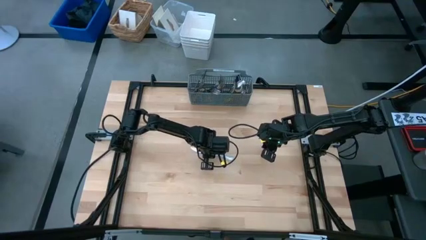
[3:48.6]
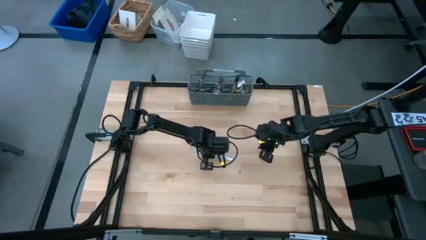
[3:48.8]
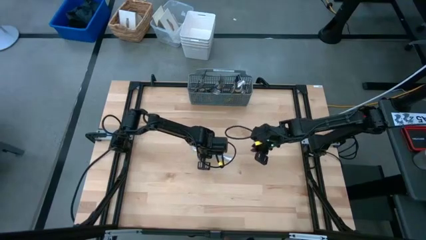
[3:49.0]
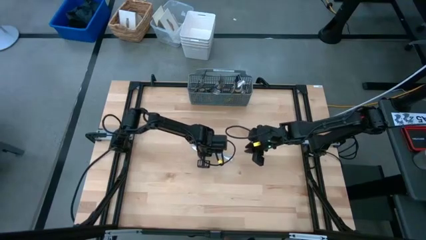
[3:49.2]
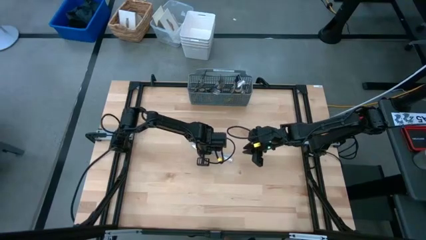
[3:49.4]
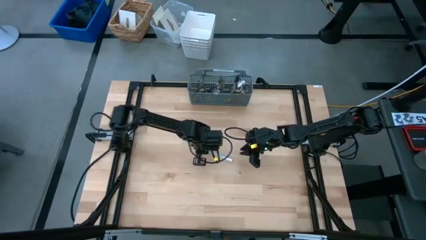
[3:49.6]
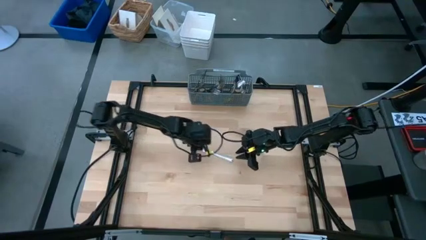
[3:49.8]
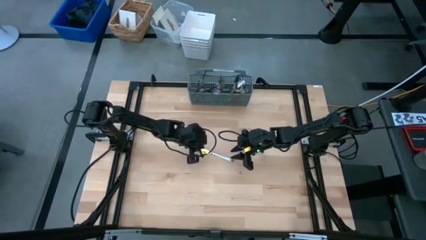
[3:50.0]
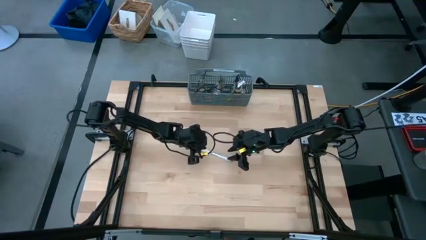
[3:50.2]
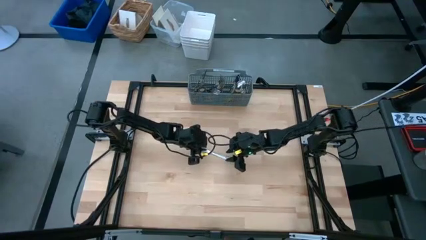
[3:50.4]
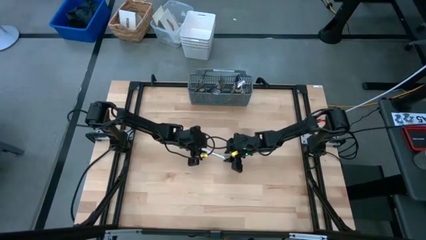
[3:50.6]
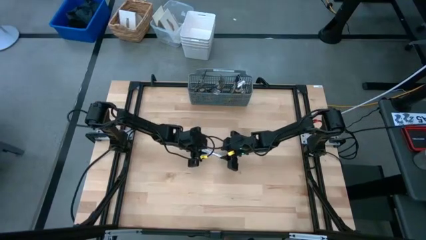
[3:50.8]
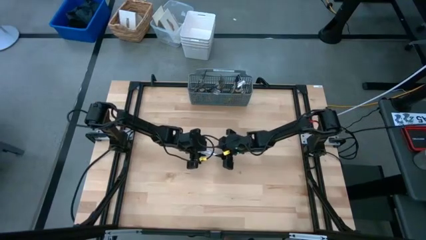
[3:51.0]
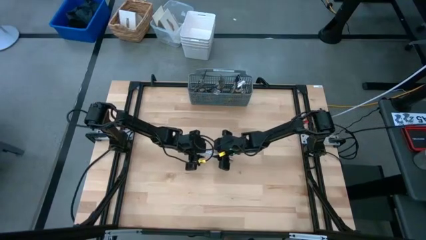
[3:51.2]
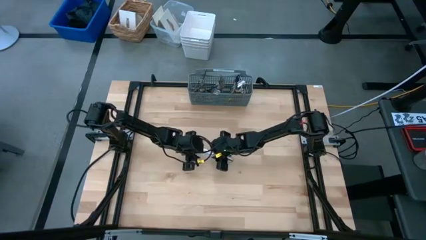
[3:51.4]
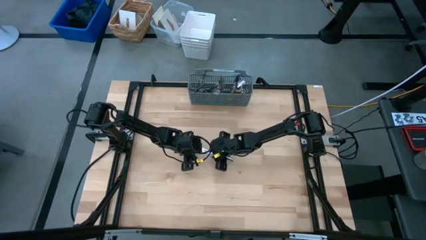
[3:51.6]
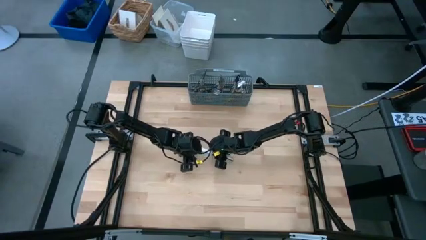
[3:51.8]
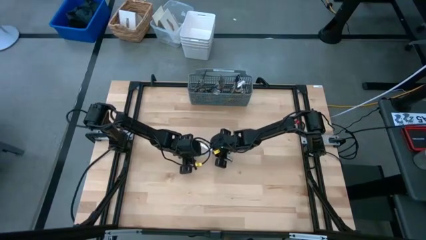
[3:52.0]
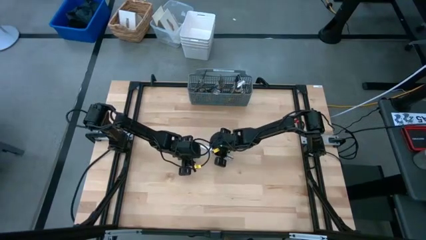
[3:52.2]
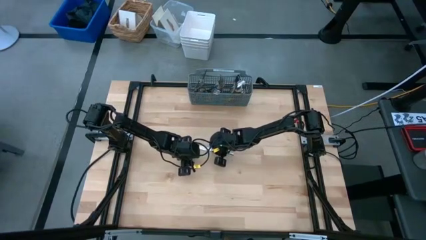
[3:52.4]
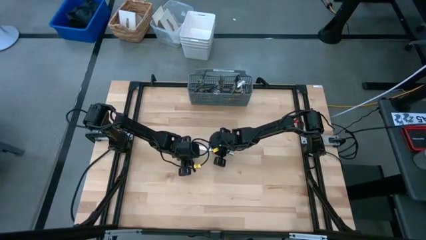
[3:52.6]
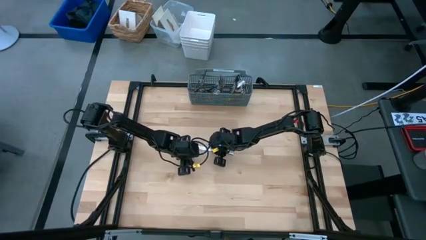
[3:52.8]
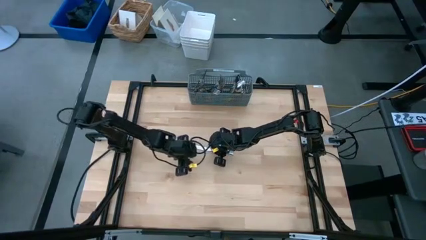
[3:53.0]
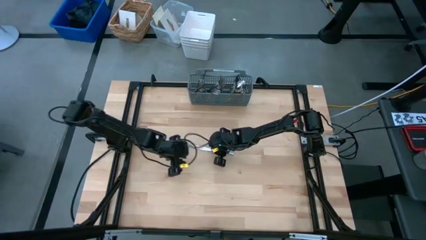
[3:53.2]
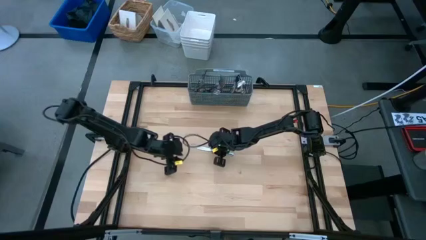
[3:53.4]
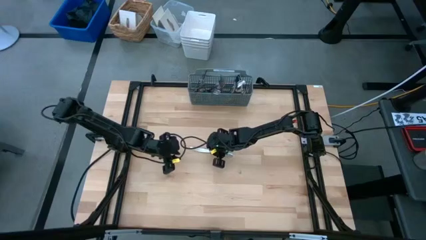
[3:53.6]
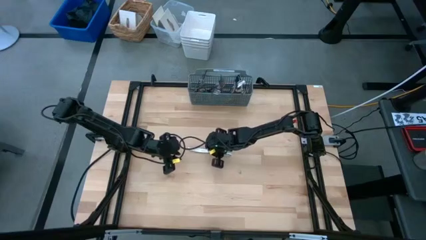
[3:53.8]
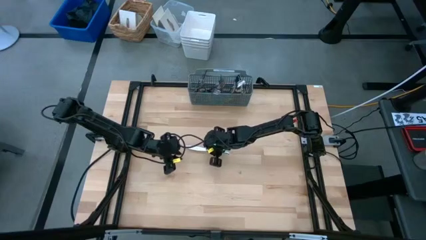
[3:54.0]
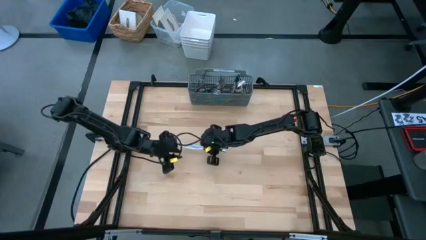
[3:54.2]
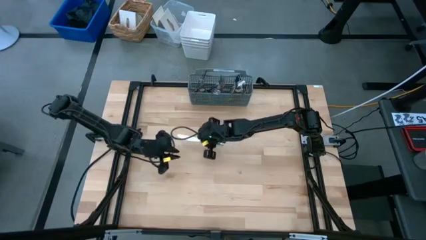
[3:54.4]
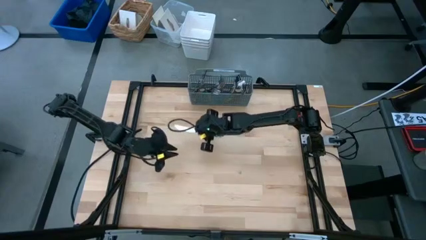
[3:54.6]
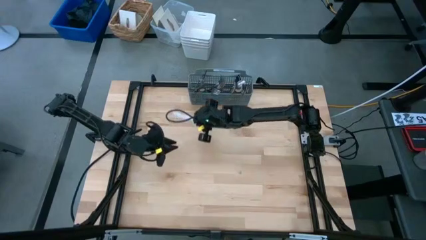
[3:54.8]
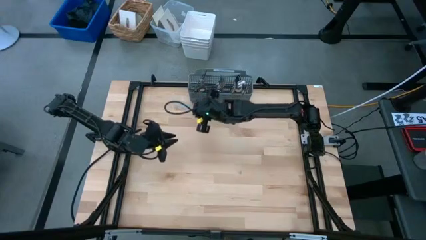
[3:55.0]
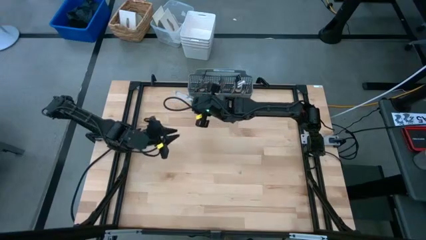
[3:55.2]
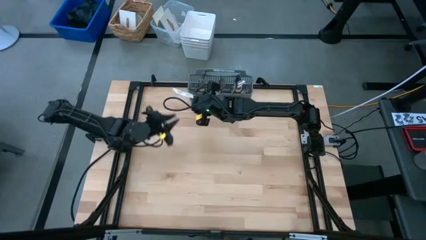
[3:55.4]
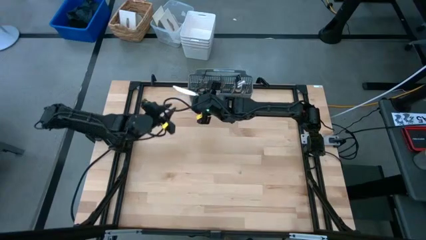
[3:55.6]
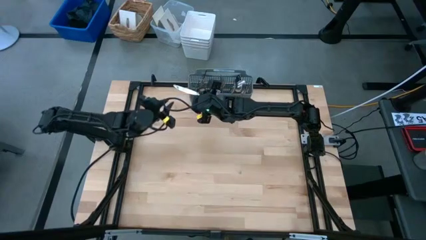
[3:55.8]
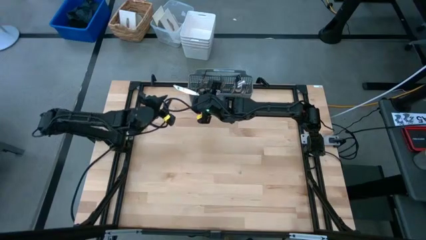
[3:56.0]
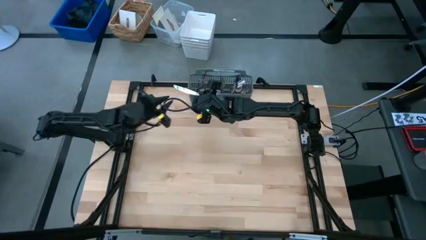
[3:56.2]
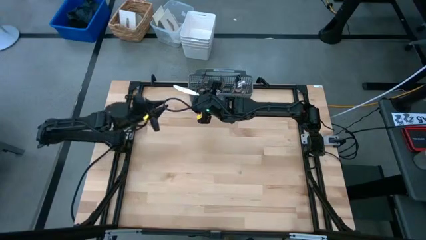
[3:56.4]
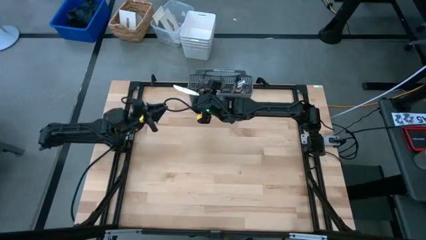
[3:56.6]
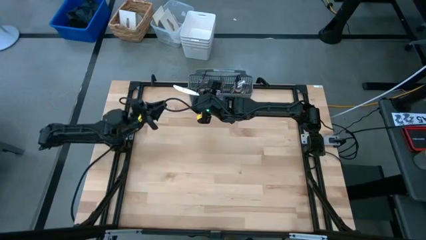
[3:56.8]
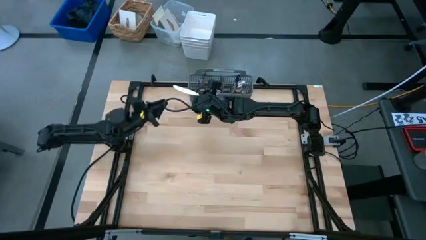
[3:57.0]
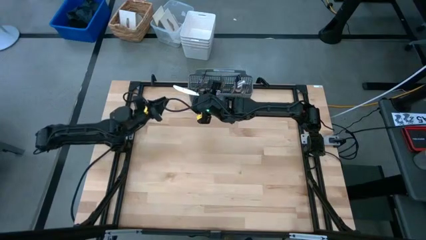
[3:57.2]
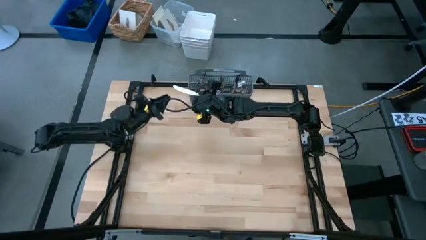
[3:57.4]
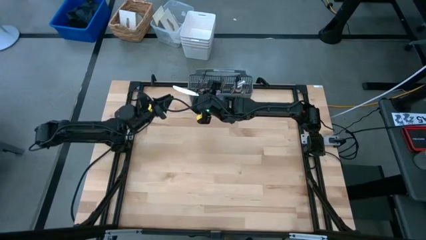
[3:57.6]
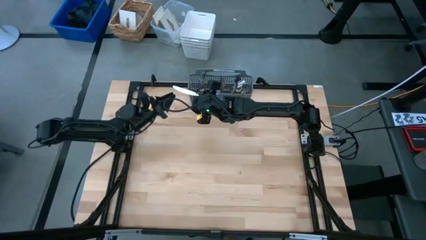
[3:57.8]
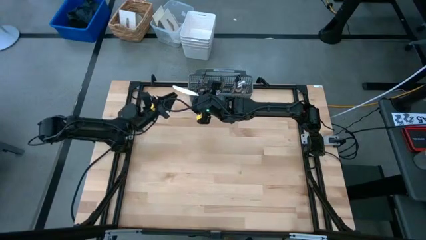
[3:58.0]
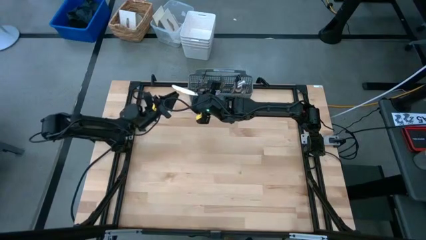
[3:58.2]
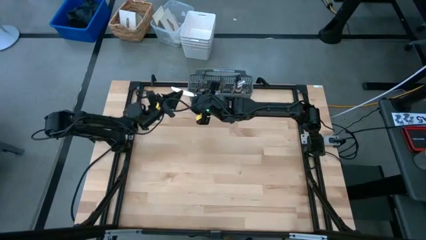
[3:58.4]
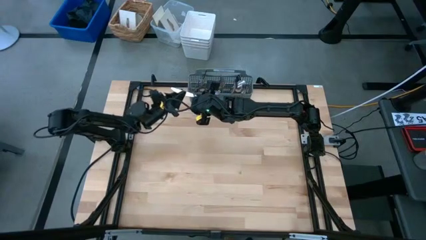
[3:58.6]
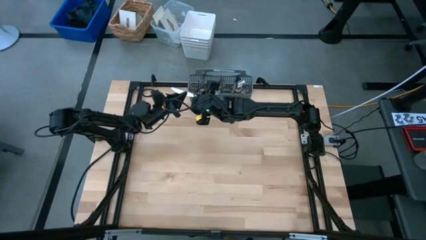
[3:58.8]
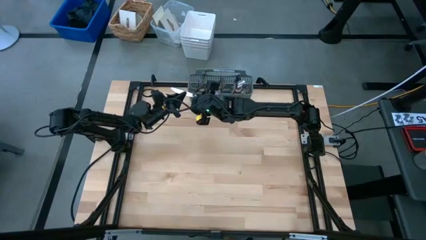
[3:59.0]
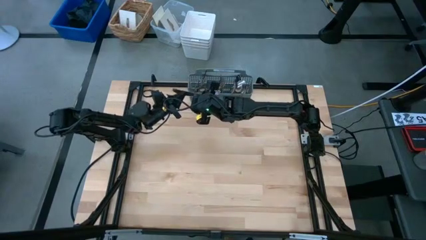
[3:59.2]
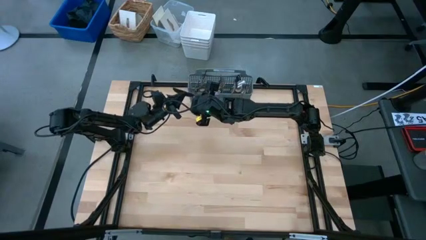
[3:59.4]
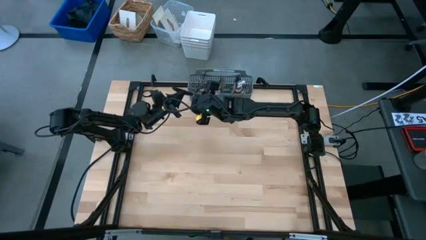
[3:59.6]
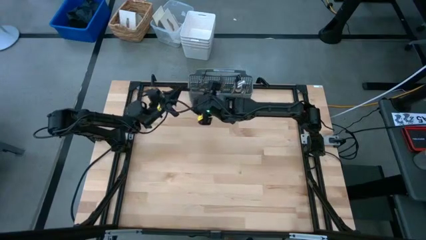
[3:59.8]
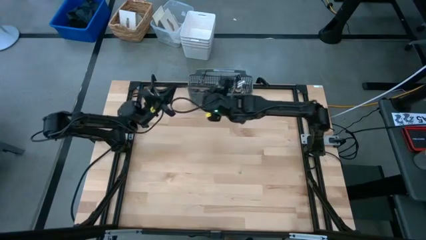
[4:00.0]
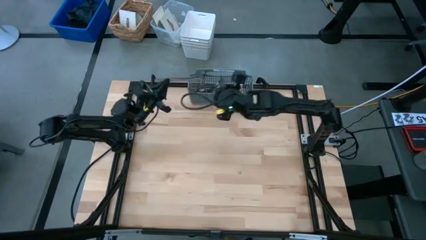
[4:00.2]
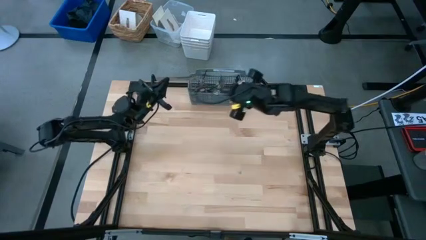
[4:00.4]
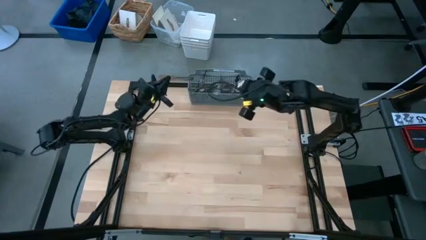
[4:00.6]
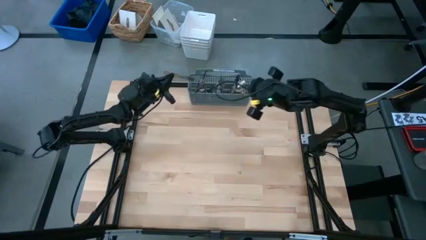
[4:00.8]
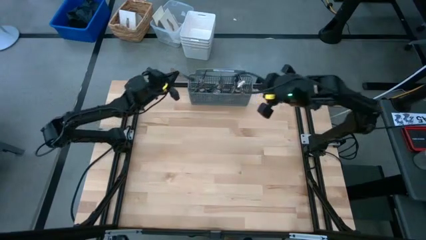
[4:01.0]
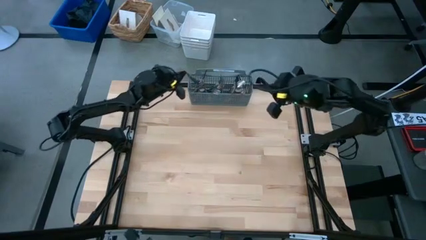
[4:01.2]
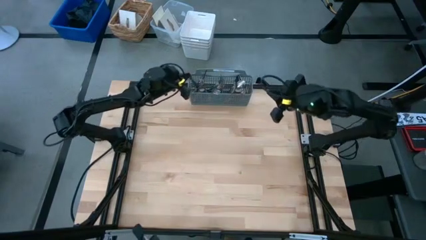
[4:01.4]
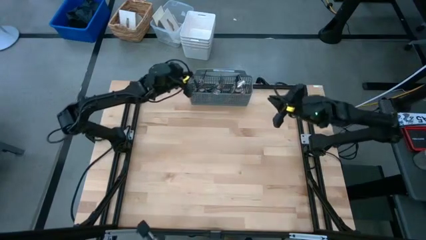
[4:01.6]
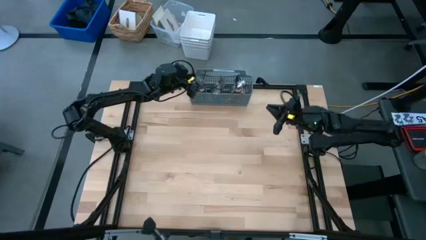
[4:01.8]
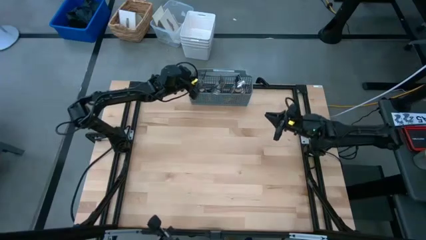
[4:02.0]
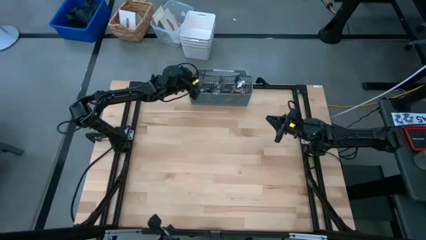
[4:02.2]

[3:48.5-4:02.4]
Task: Sort silverware
Put the table knife into the gray silverware organizer

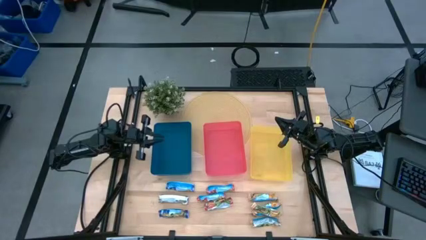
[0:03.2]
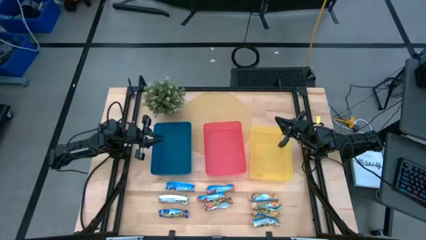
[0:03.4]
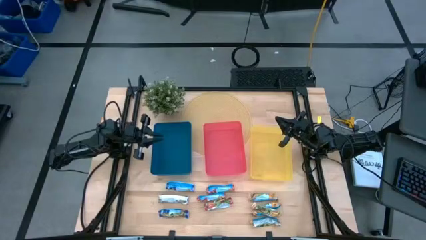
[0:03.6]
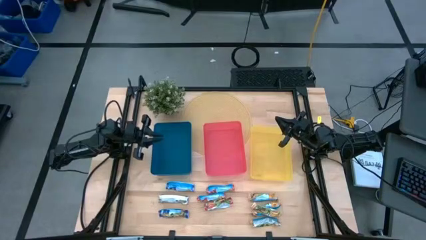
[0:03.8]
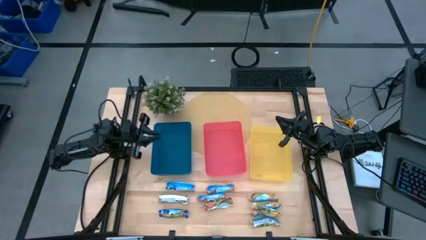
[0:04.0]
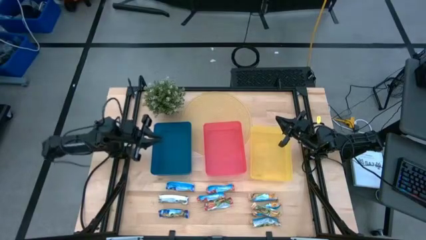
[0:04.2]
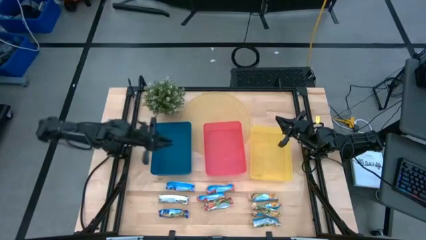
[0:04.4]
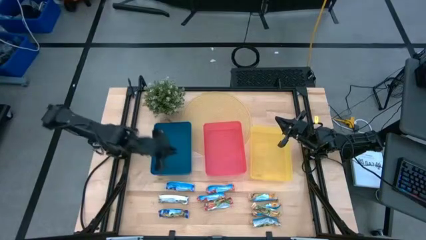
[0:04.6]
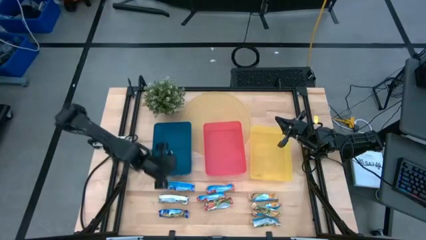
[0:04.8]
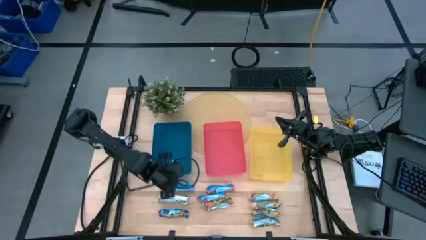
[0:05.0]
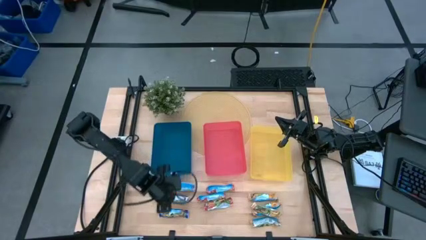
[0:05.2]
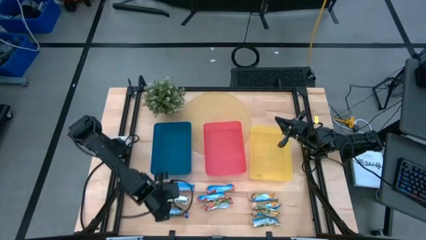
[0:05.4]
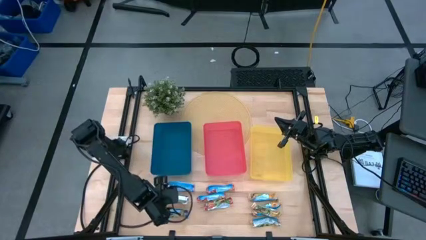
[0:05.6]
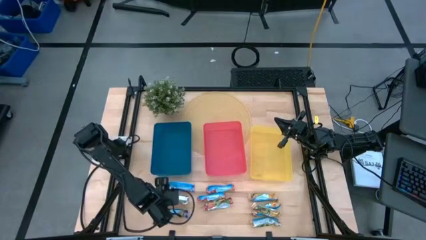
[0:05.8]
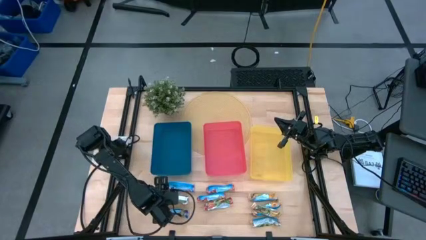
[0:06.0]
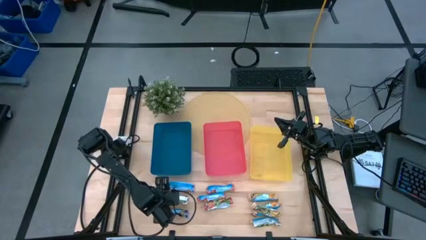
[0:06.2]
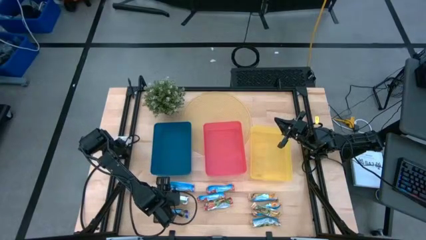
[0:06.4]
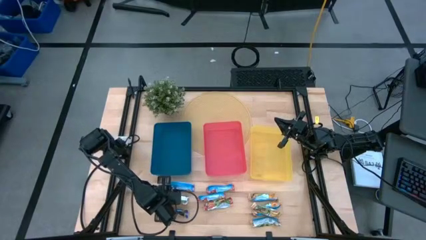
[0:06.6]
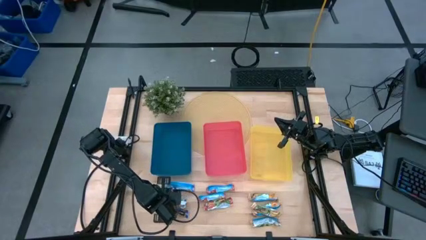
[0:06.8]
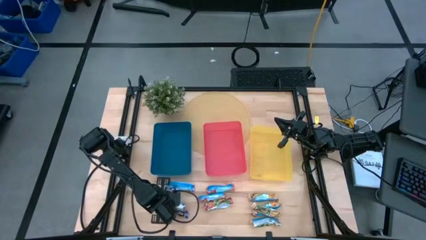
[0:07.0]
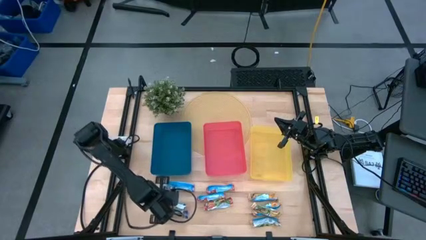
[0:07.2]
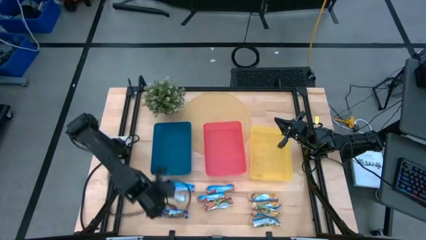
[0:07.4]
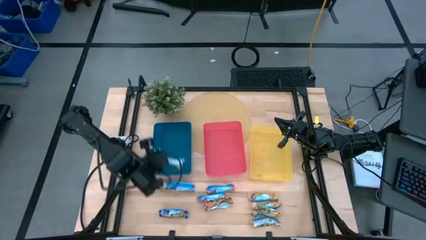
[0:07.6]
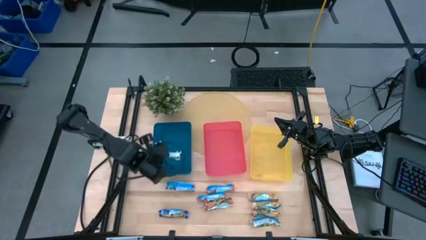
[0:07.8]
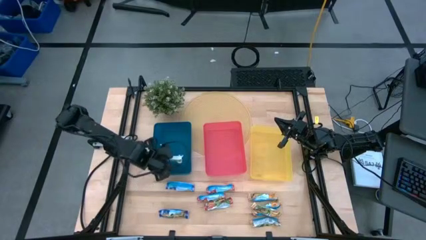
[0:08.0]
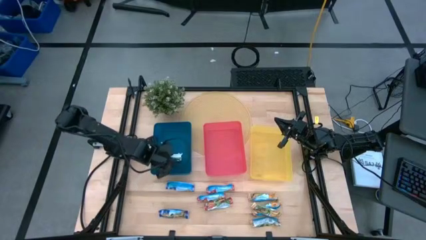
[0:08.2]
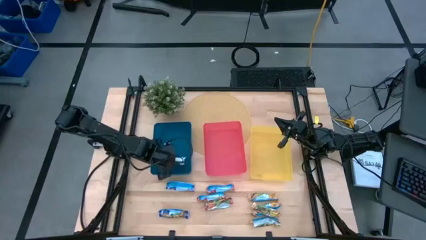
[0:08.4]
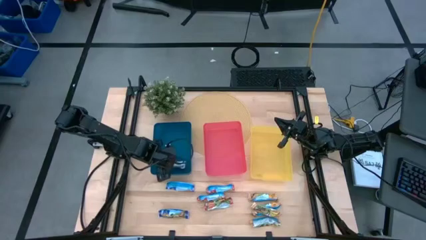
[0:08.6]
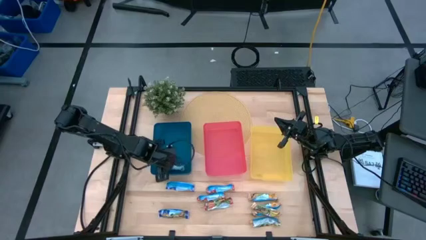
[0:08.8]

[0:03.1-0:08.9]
Task: Pick and place Granola Bars by type
Put the blue granola bar into the blue bin
